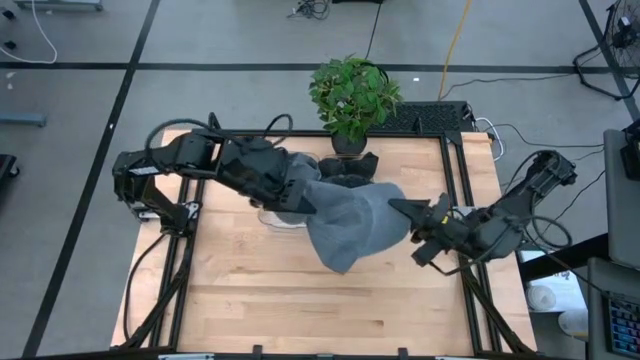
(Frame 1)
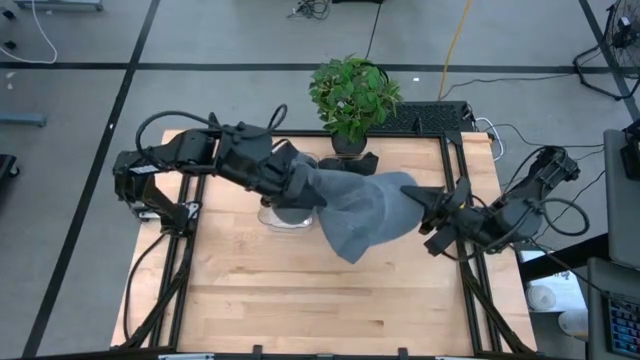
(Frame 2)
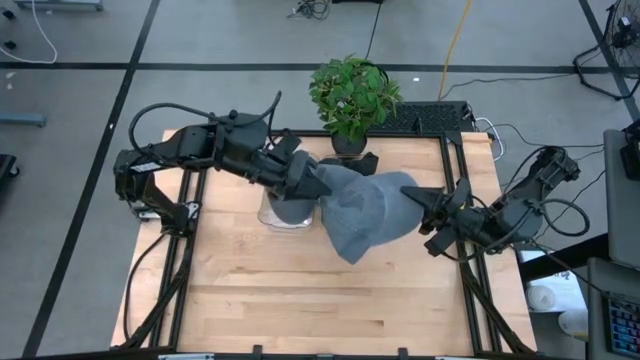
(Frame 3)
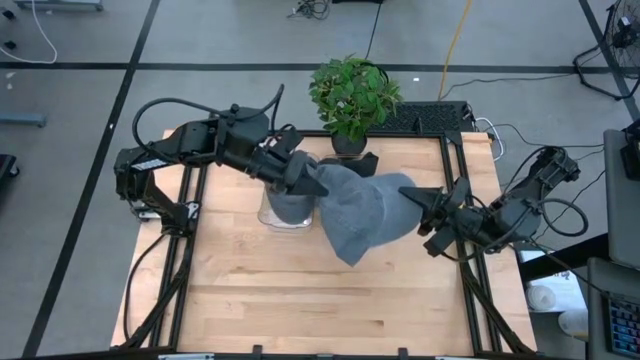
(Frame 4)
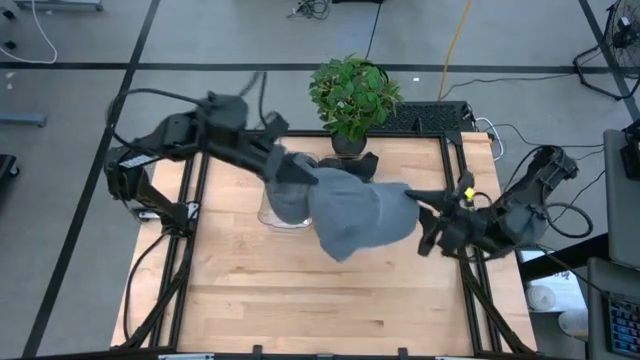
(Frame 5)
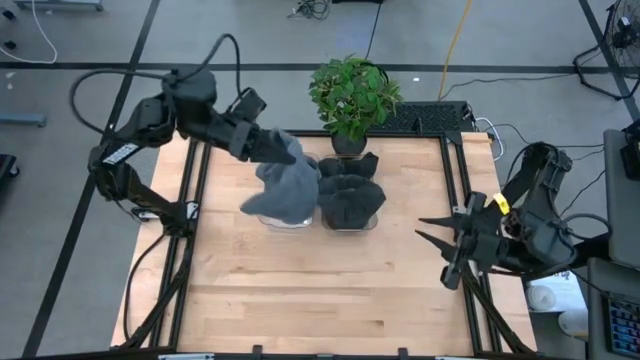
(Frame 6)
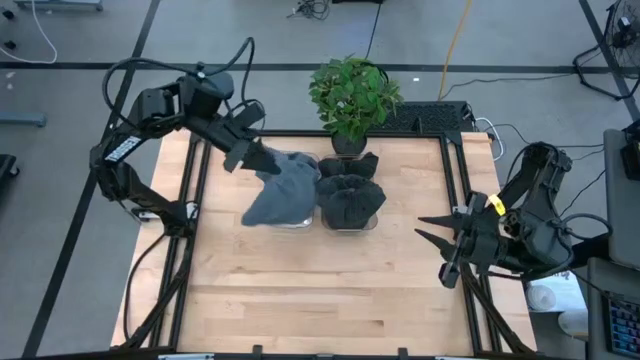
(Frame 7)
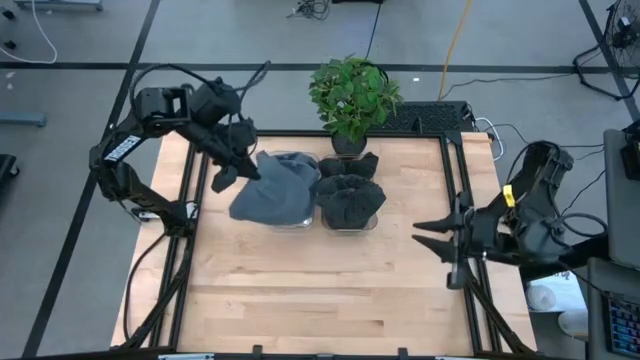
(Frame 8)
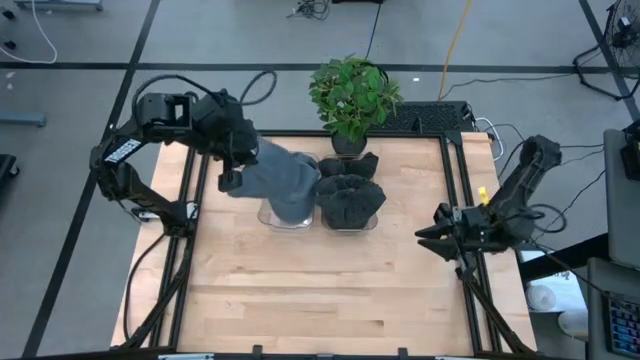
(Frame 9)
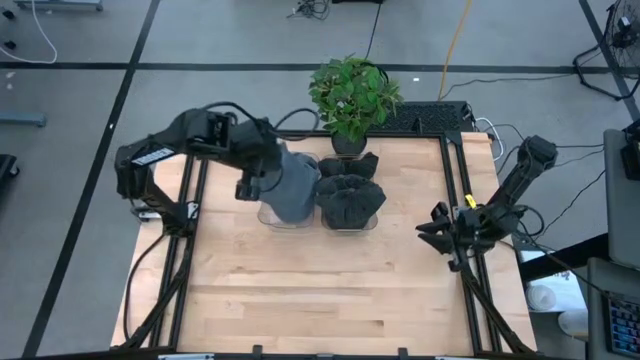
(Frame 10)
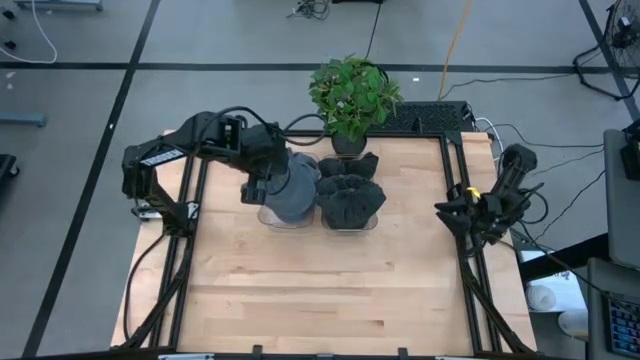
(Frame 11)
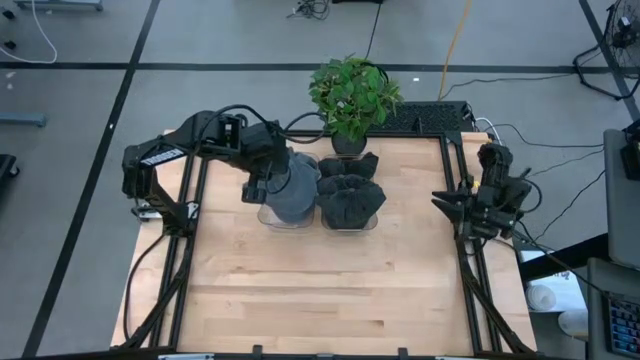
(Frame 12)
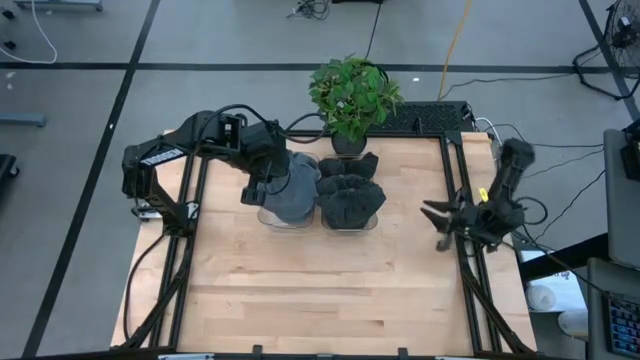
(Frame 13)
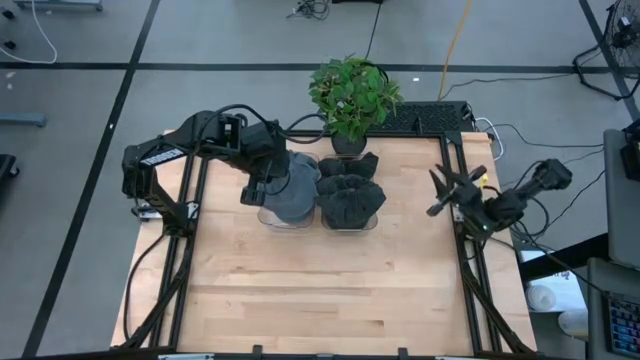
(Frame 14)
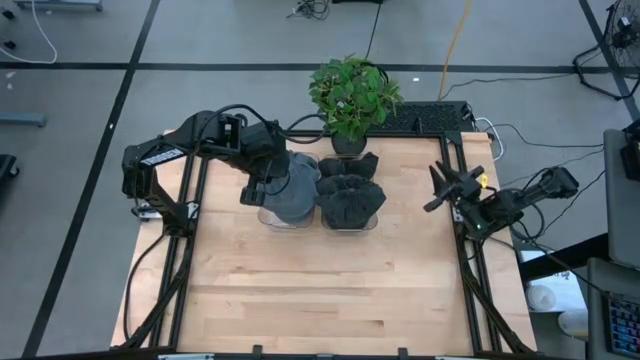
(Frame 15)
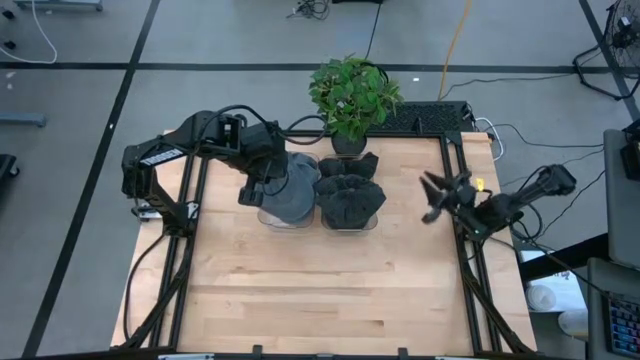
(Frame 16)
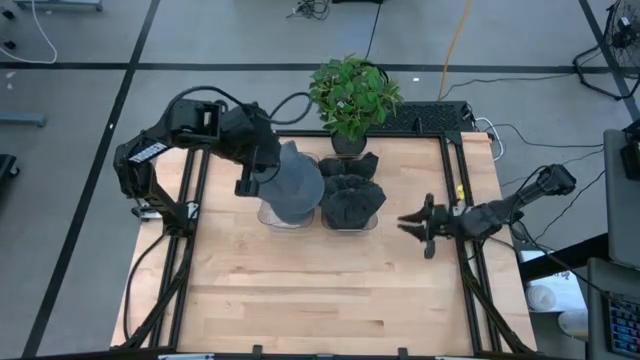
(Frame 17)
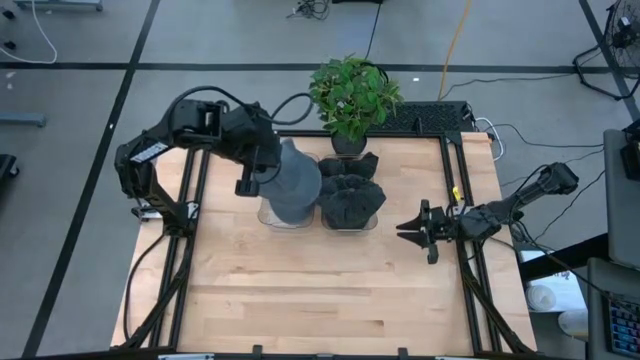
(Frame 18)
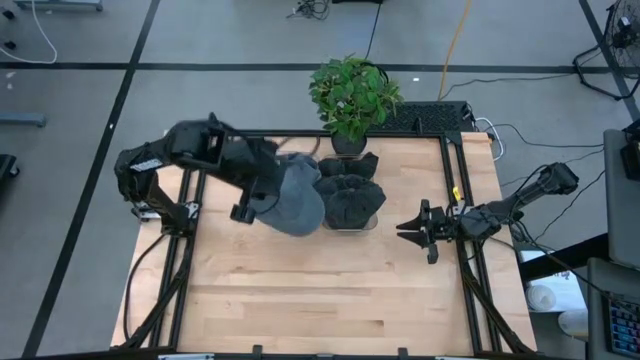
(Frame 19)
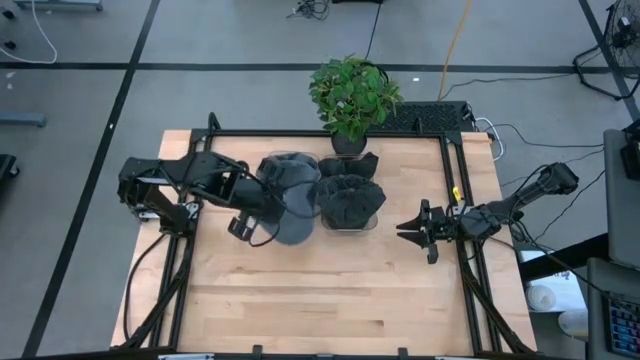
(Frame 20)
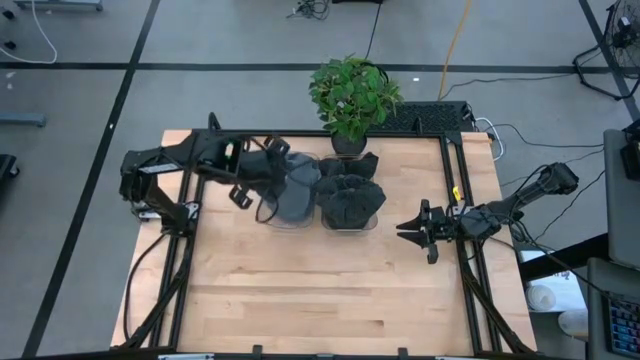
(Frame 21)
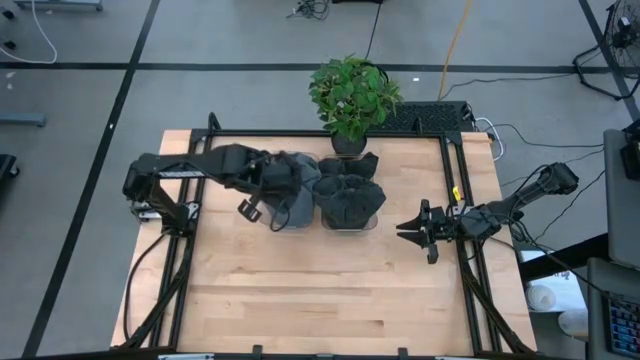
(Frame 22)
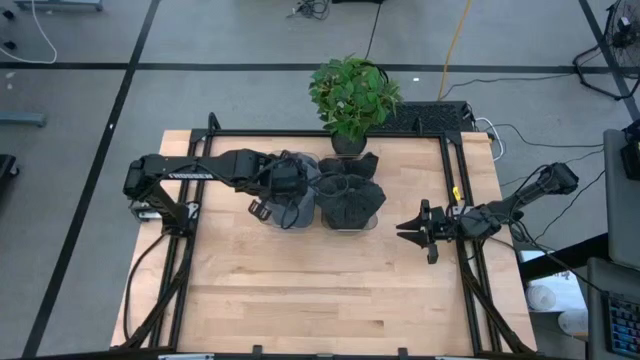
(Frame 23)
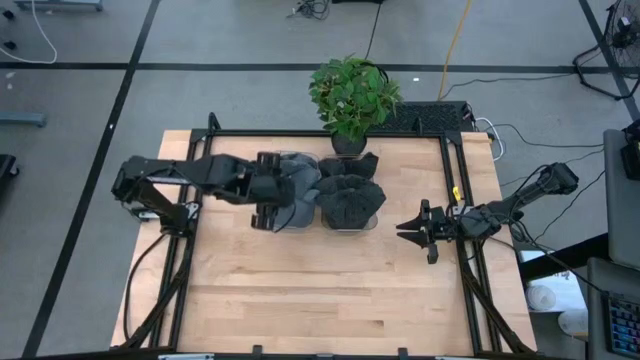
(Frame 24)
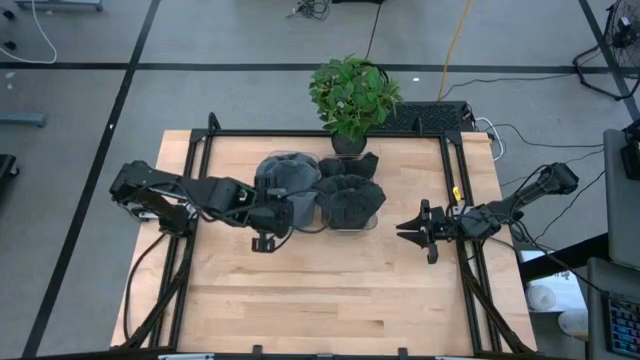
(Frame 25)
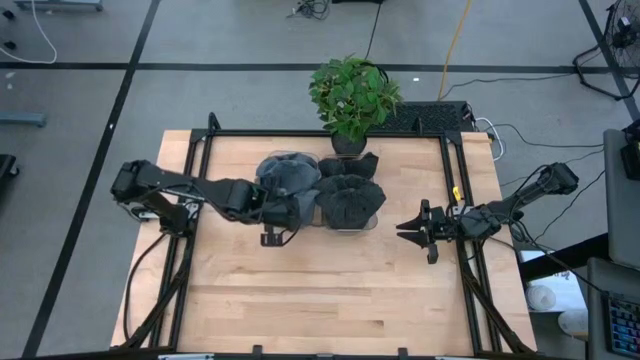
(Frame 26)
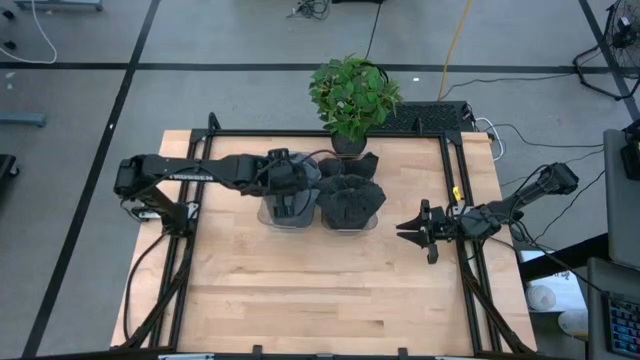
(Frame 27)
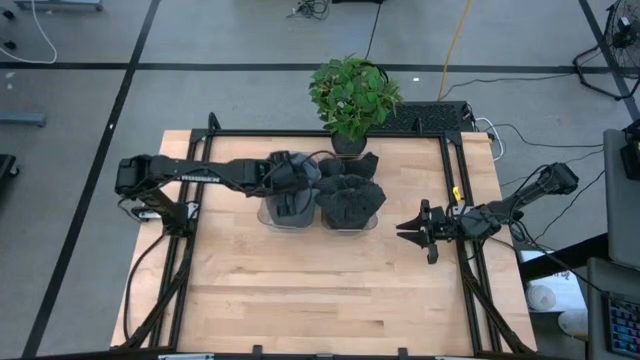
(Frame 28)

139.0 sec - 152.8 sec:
Task: Pick & Place hat
Put the blue cap into the left transparent bin

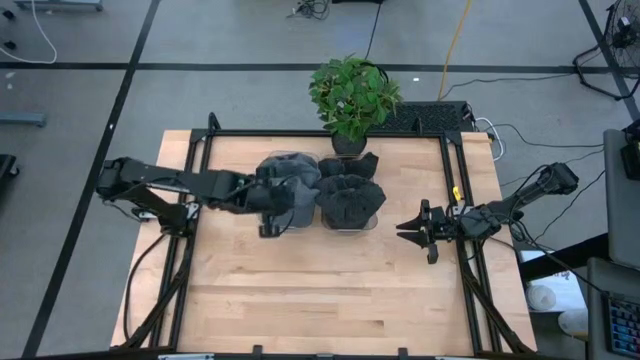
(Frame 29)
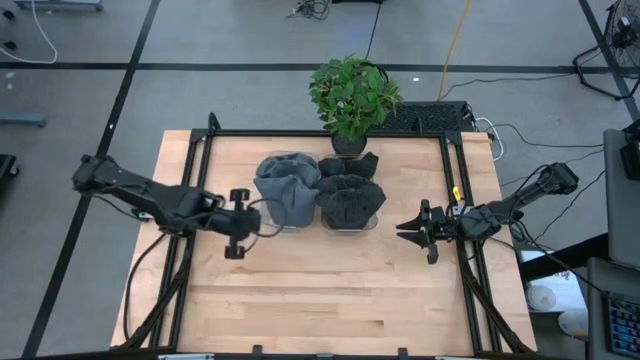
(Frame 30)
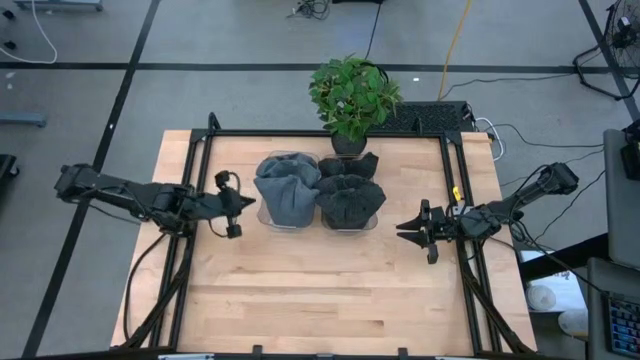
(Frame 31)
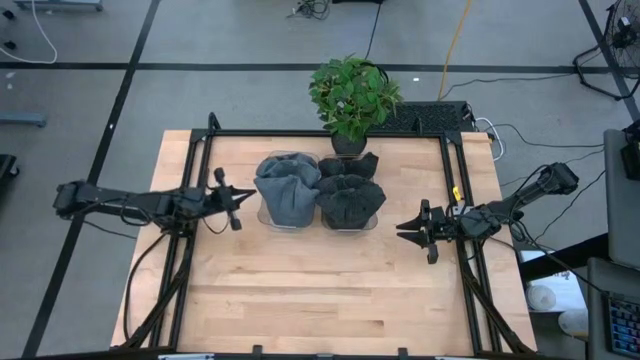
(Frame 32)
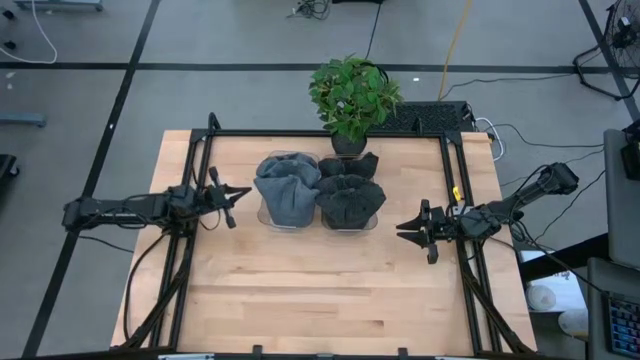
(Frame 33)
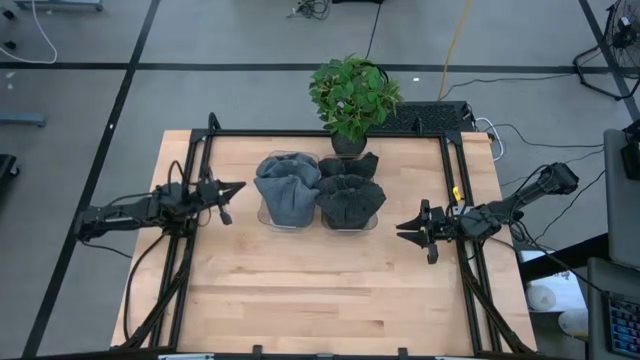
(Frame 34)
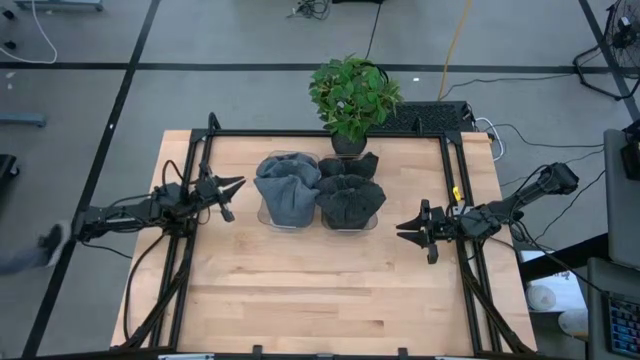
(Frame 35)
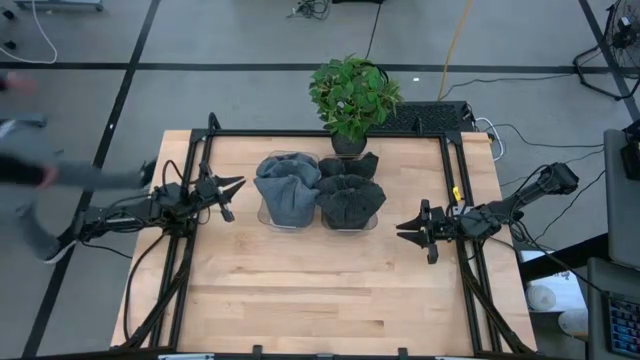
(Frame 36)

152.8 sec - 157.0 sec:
Return to Home Position

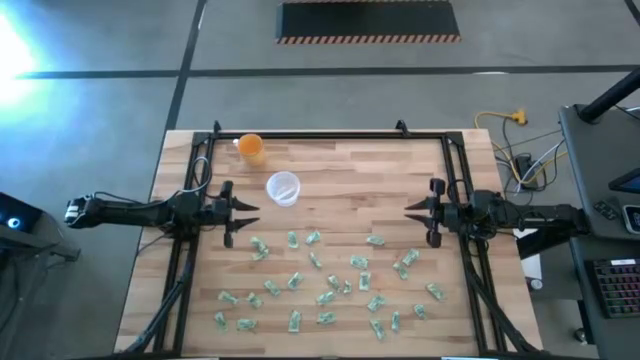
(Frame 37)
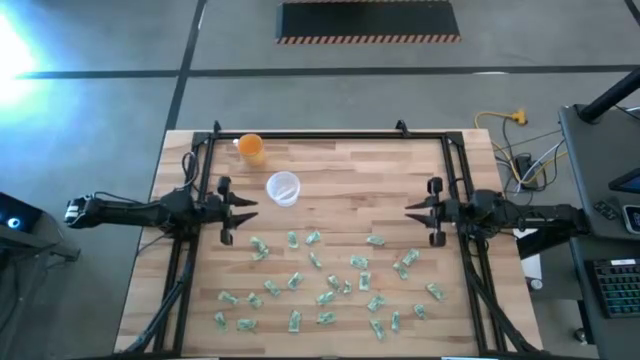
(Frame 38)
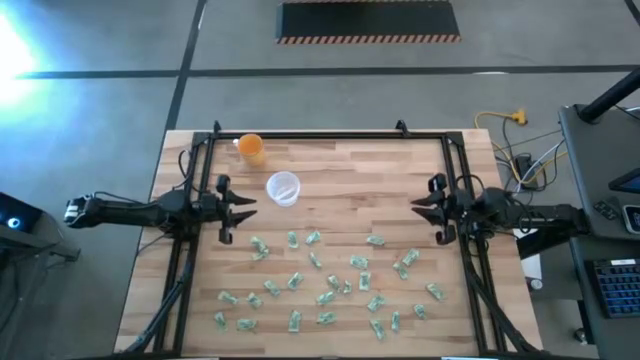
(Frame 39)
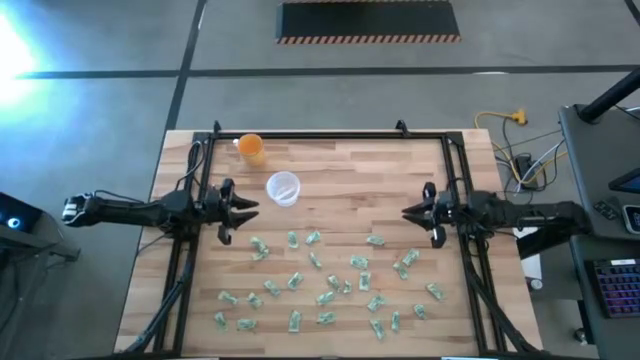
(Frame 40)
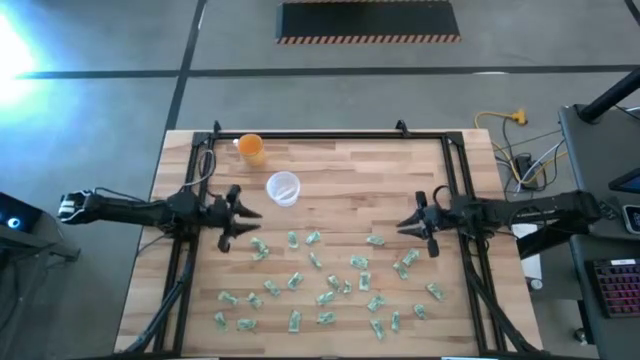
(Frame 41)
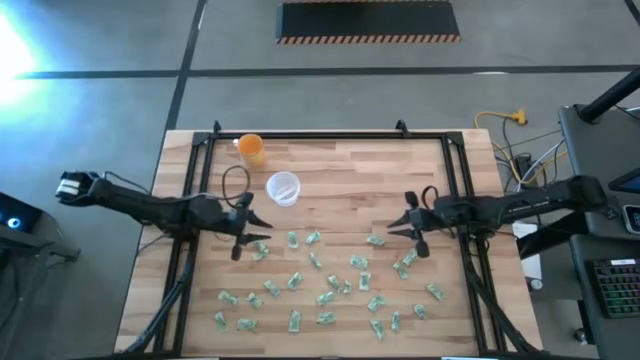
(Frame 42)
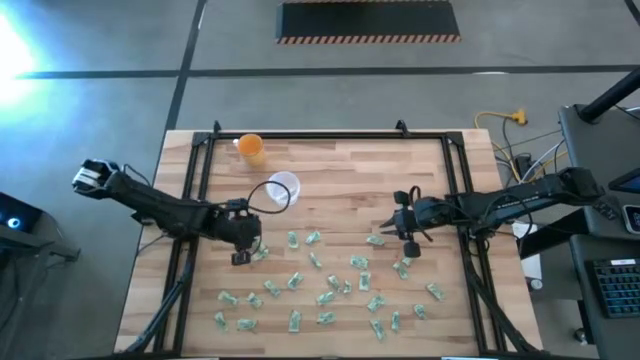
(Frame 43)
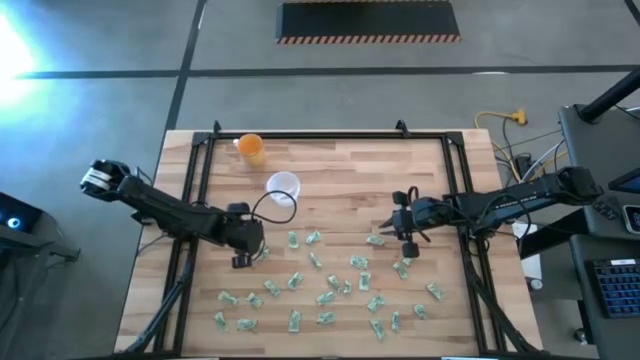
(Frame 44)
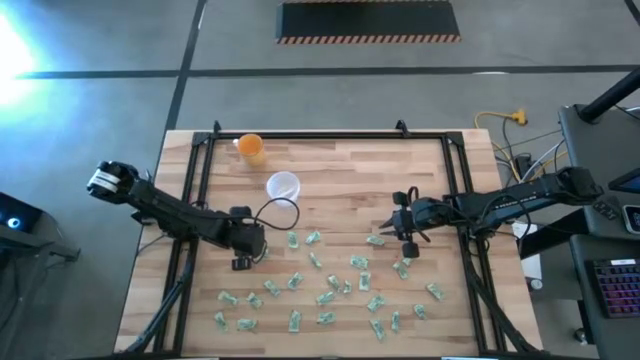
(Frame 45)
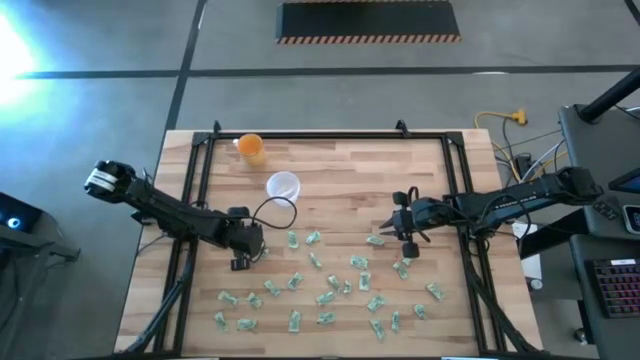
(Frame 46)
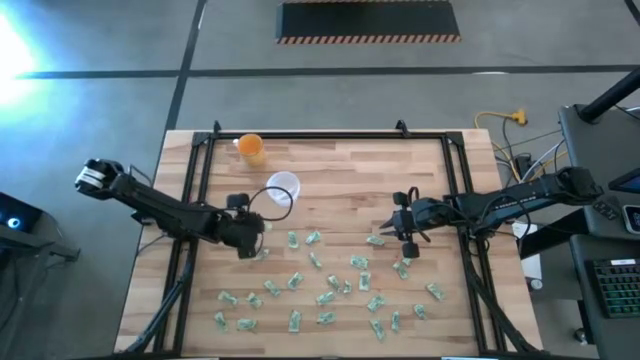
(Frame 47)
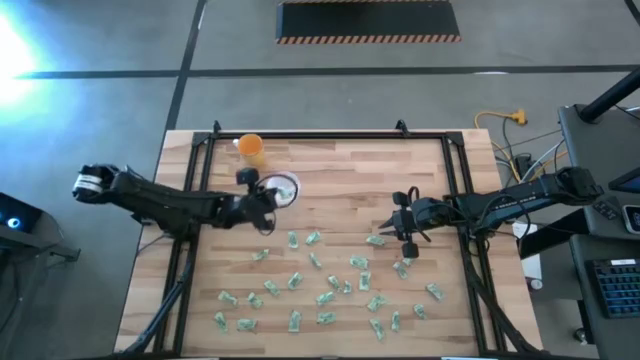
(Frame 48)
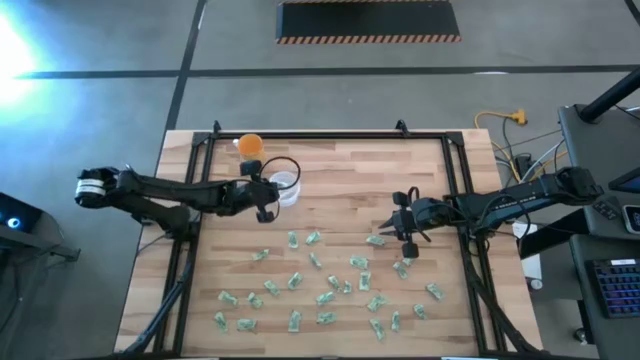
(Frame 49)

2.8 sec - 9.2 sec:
Task: Pick and place Stevia / Truvia into bins
Put the stevia packet into the transparent container
